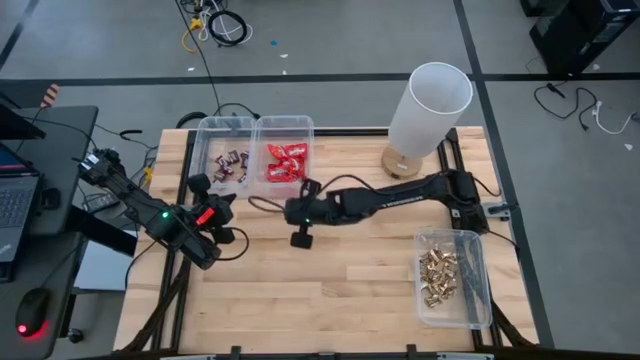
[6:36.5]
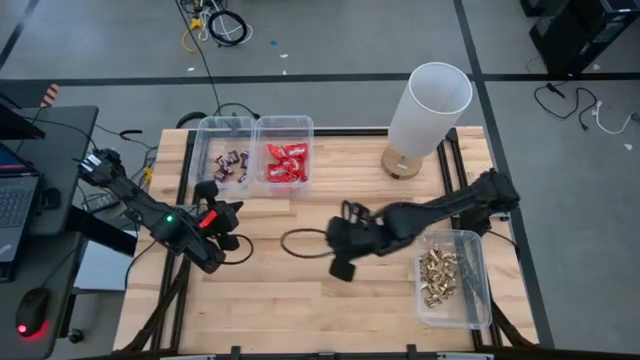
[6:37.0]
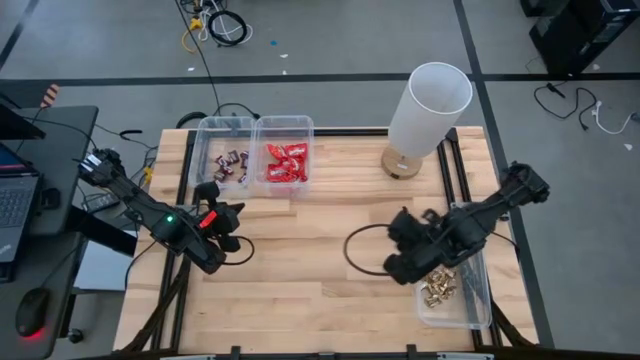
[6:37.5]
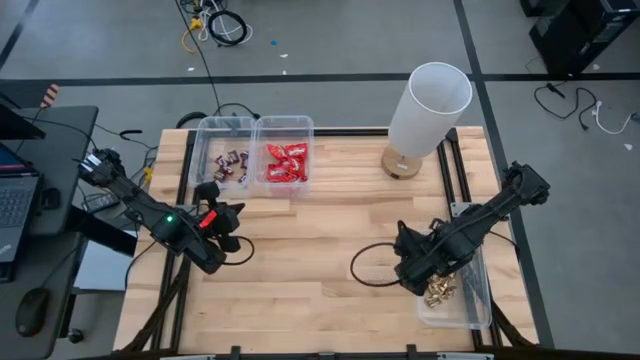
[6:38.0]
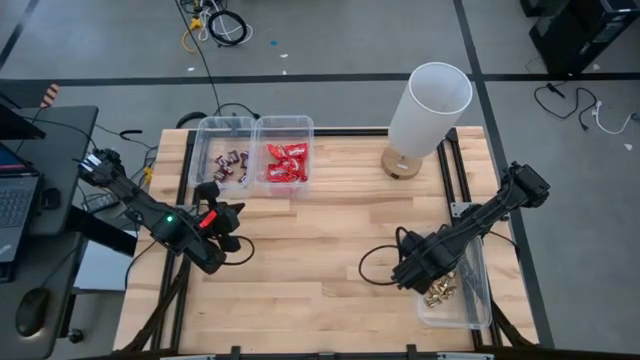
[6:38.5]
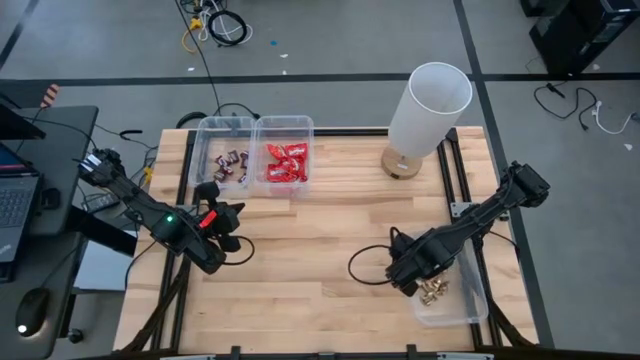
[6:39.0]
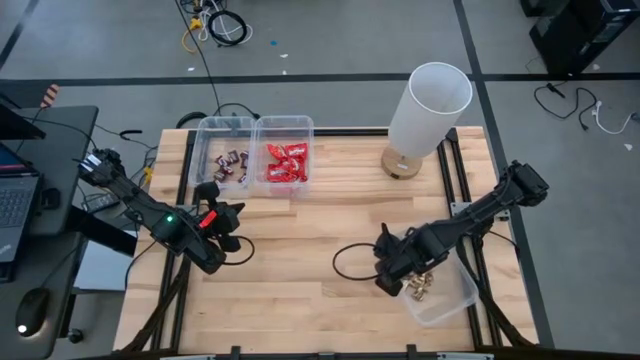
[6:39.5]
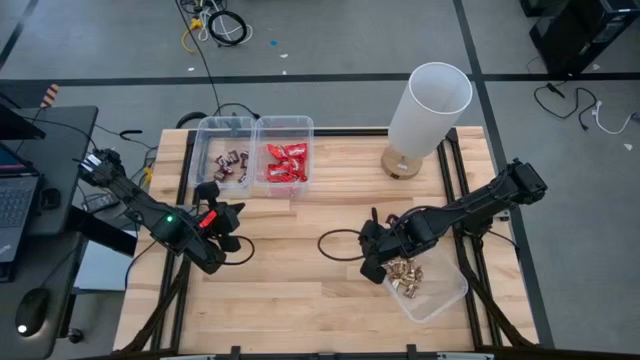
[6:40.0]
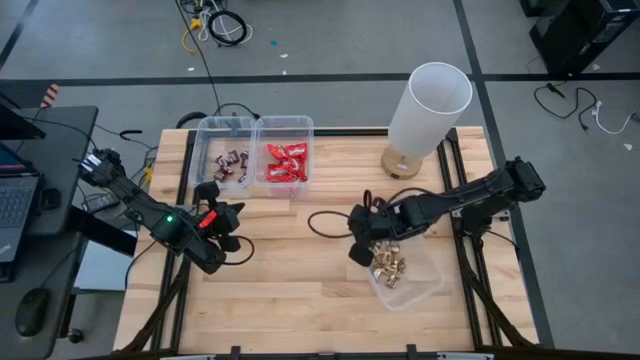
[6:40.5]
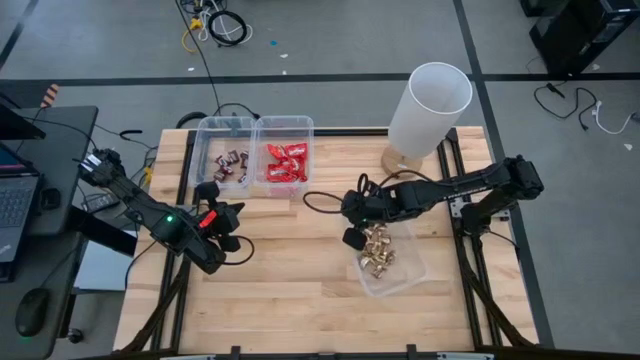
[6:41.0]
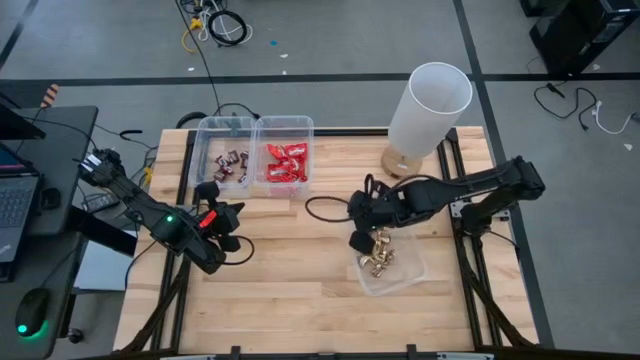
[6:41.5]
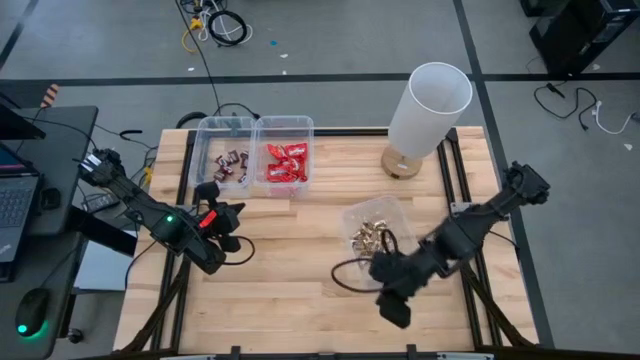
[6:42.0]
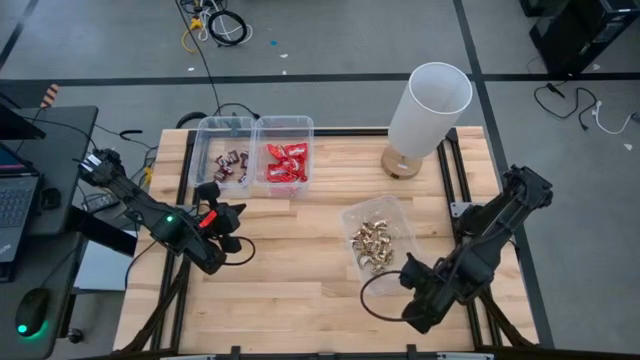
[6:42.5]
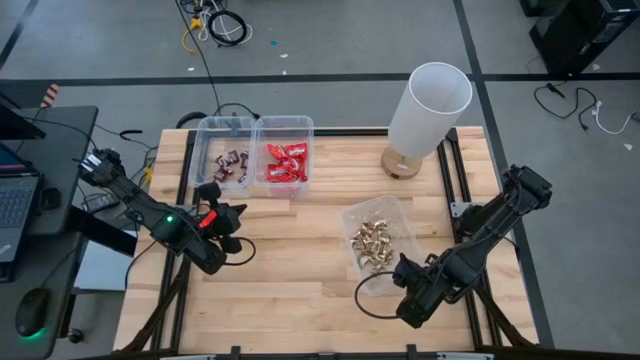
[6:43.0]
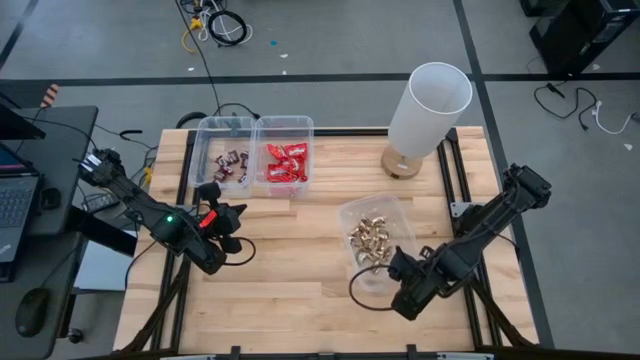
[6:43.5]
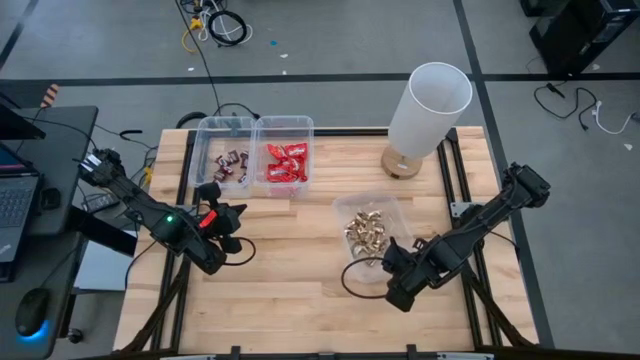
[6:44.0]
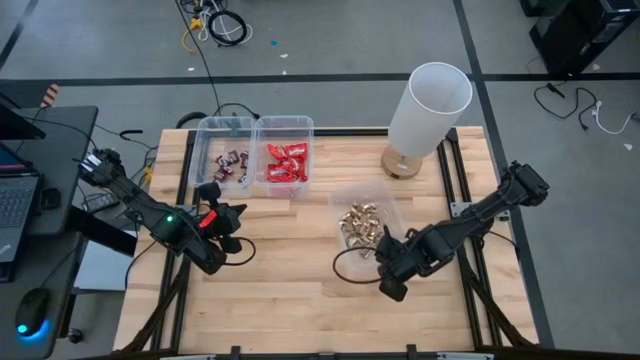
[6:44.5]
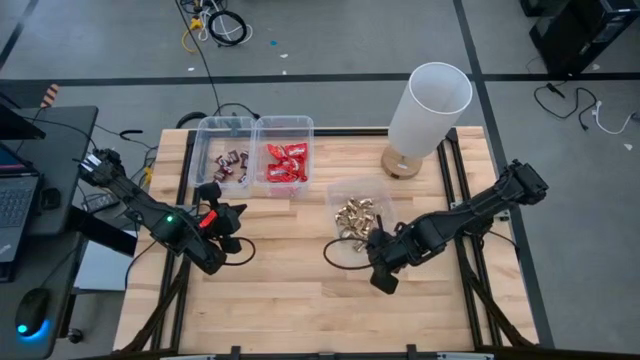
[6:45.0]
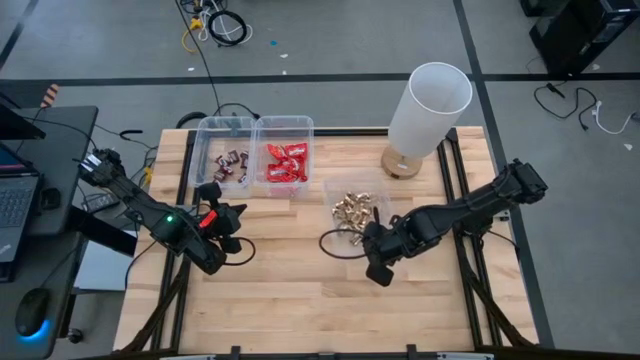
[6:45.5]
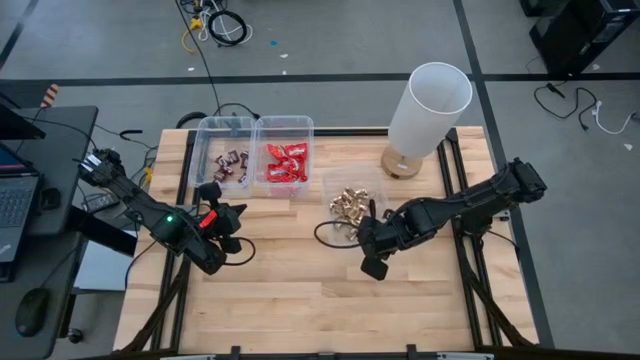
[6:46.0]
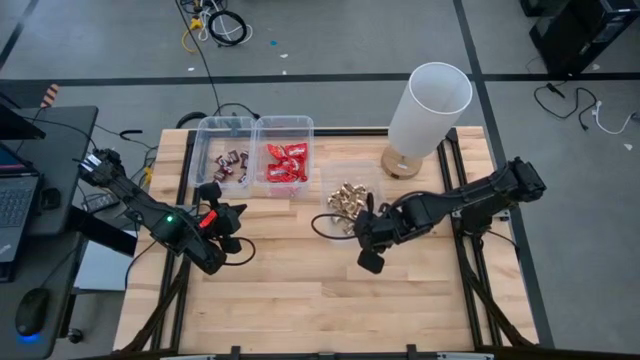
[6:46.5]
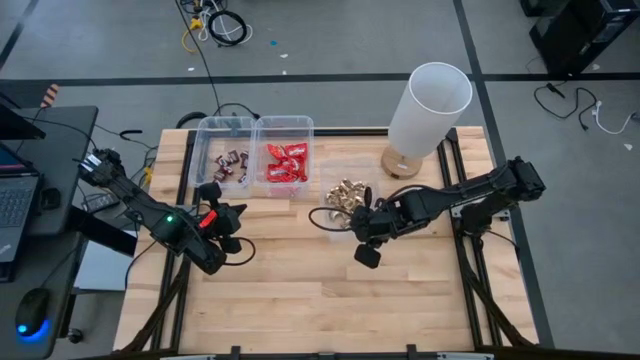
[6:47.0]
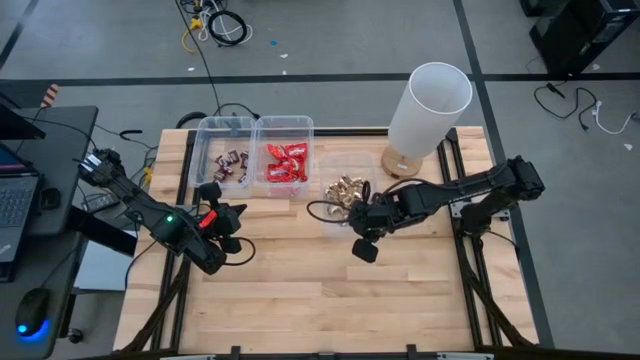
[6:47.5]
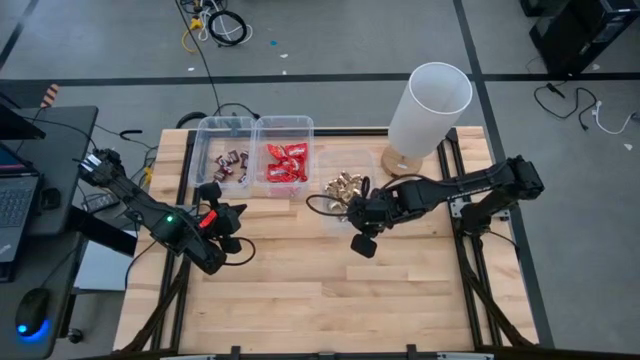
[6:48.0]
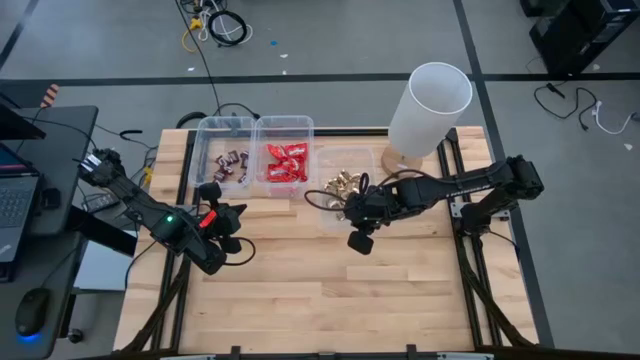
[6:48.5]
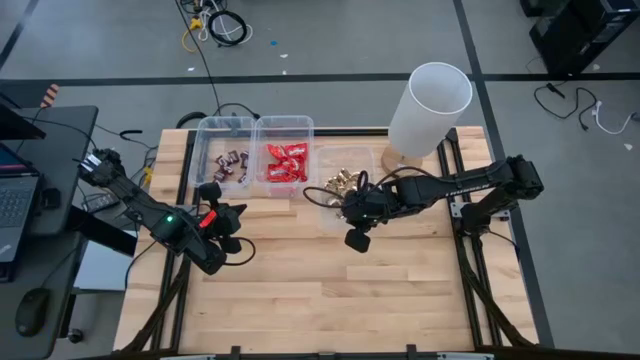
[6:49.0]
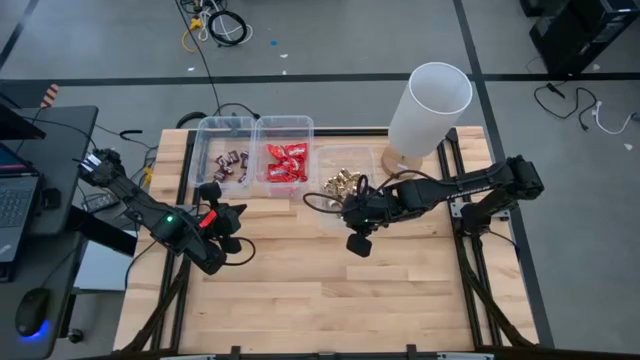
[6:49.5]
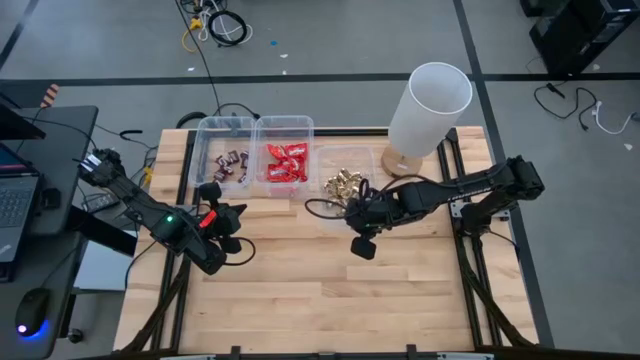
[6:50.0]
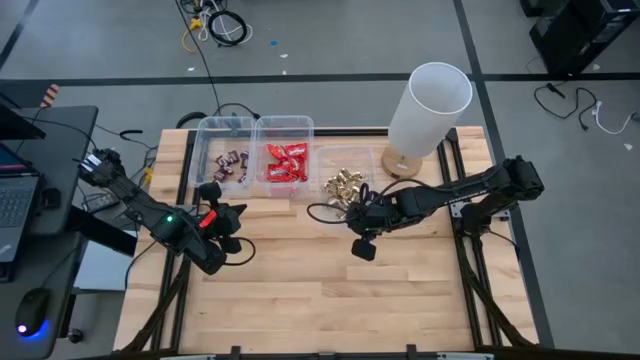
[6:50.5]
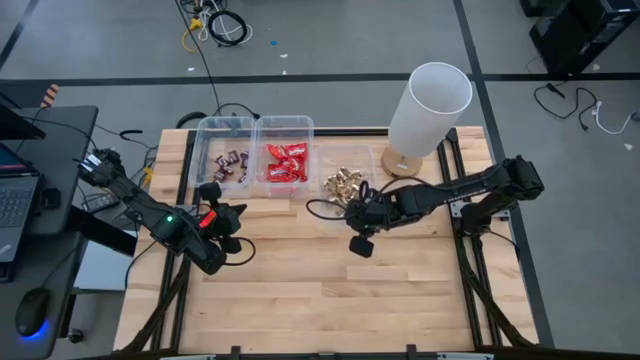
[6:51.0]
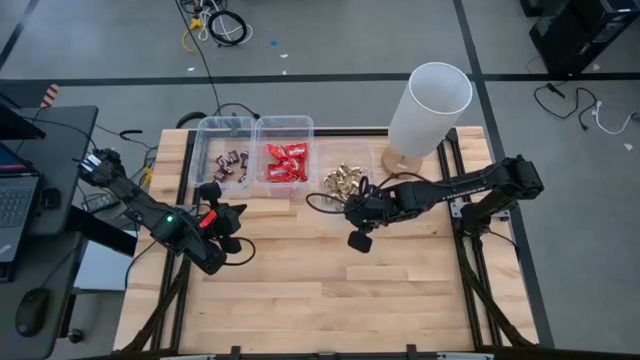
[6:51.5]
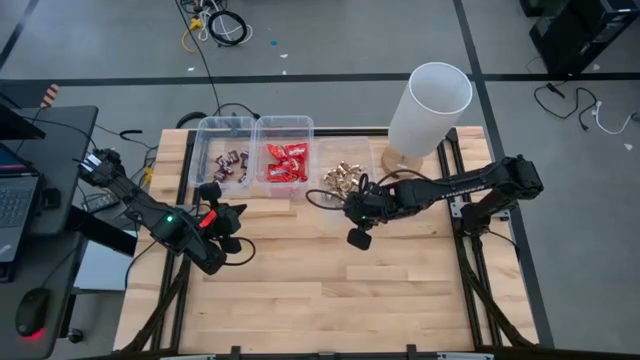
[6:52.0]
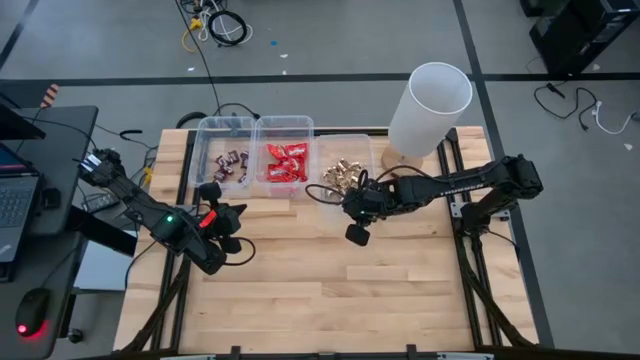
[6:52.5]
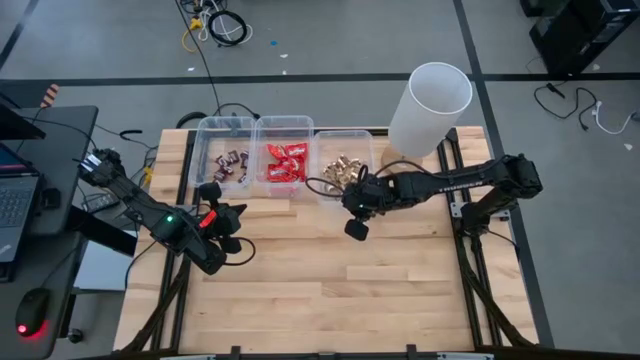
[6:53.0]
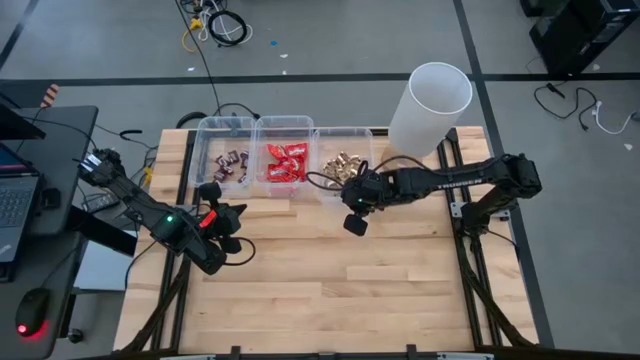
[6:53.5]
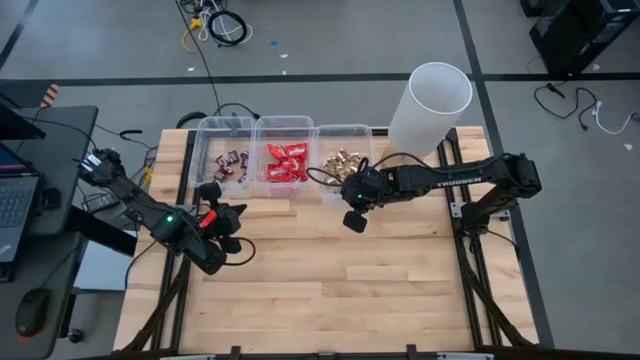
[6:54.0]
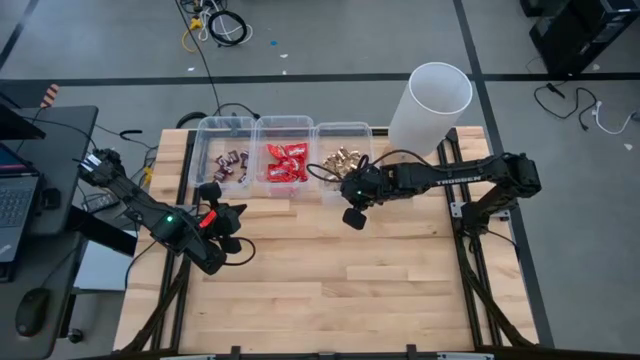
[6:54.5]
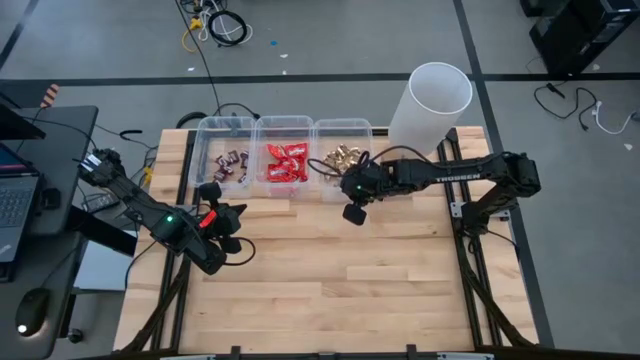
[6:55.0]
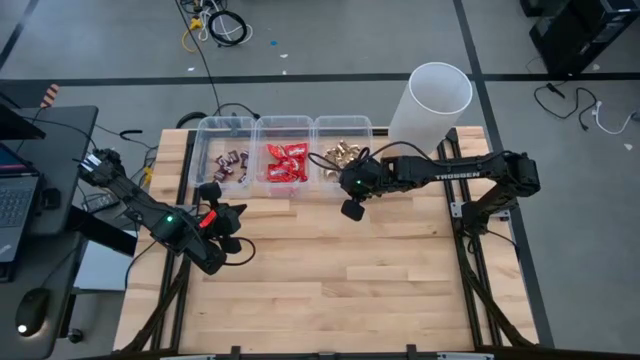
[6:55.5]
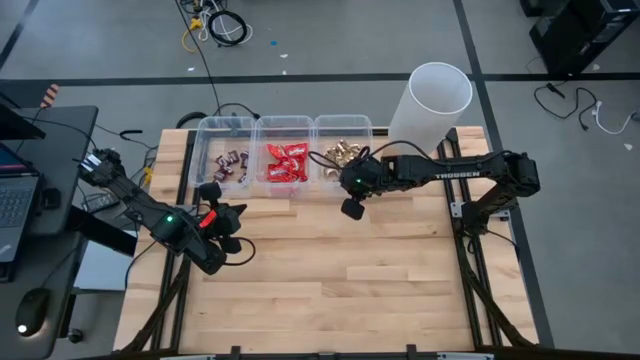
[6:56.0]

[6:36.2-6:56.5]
Task: Sort candy
Move the transparent bin to the top center of the table
